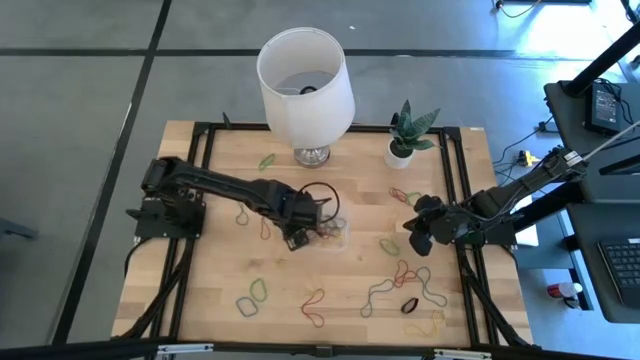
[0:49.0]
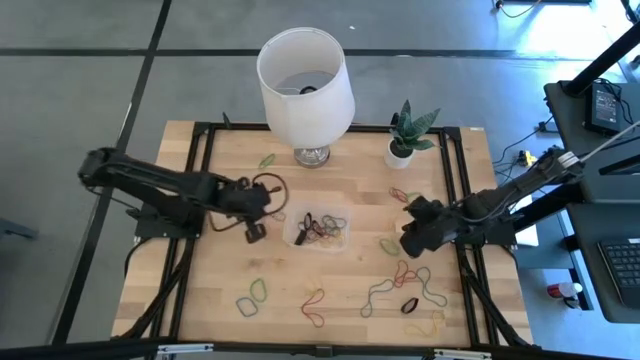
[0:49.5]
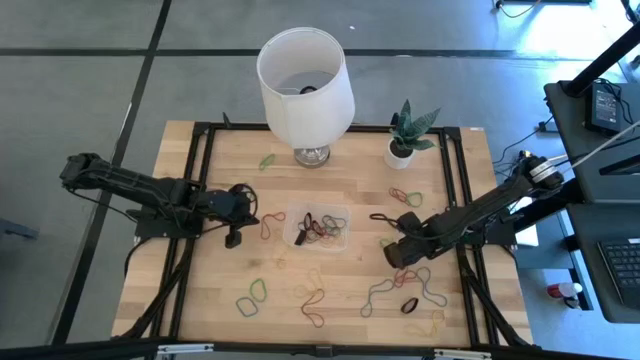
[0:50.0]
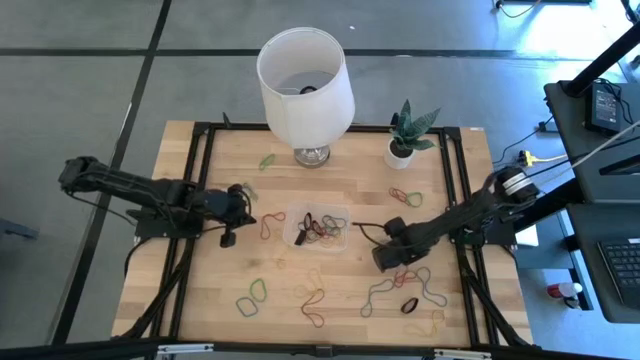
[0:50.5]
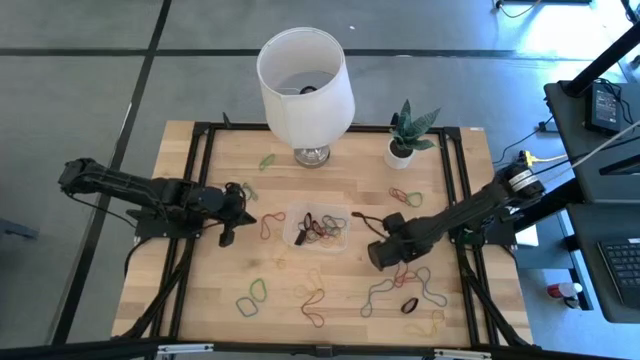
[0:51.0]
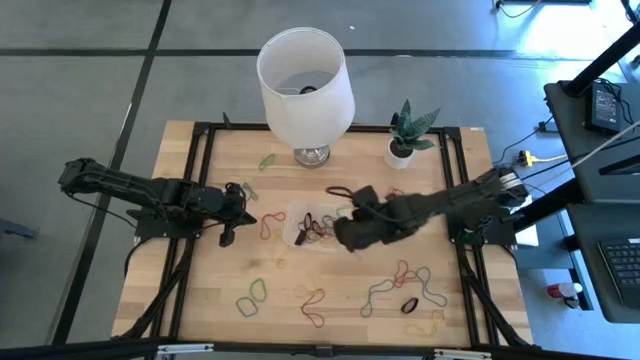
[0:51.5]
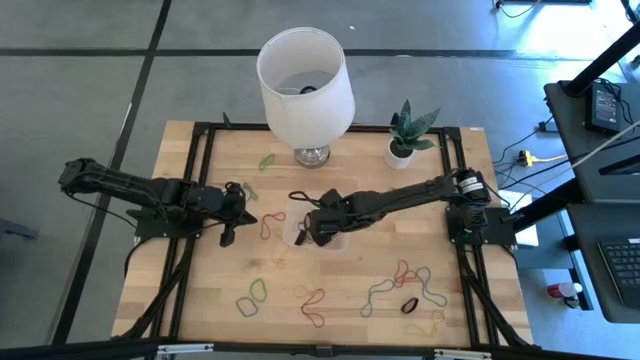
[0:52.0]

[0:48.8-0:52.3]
Task: Pick and place rubber bands into bin
Put the green rubber band into the transparent bin

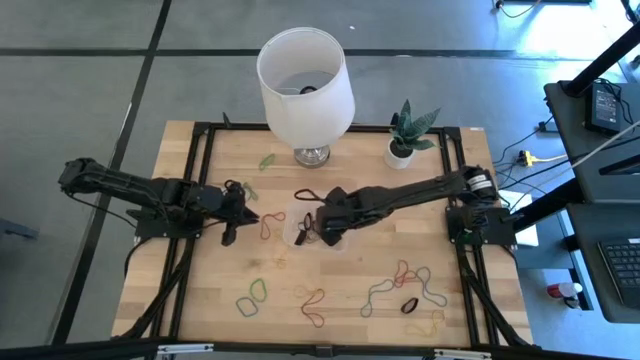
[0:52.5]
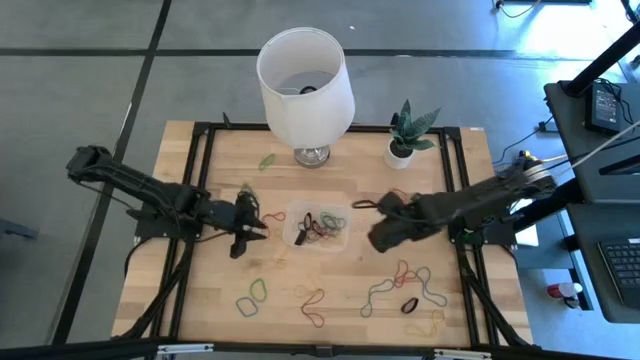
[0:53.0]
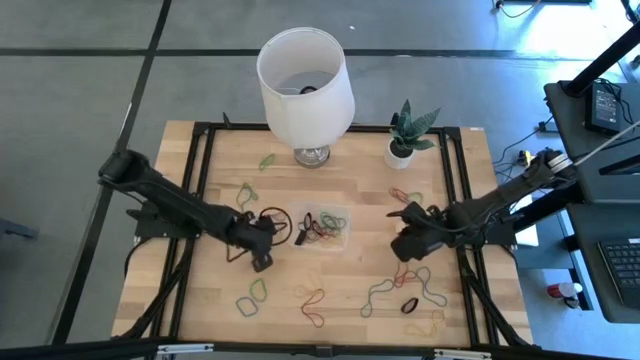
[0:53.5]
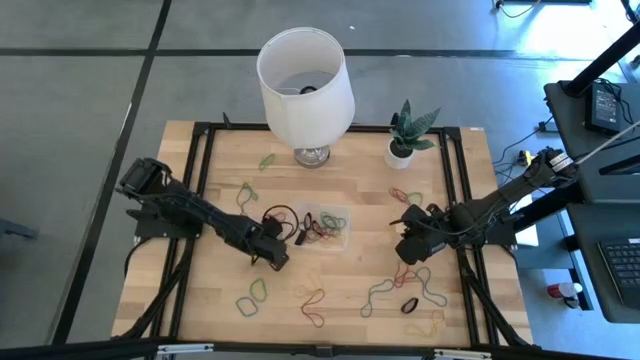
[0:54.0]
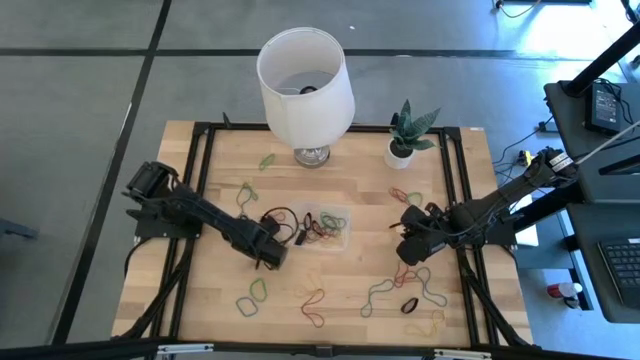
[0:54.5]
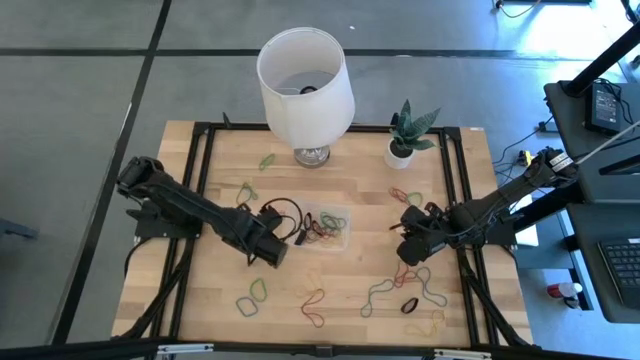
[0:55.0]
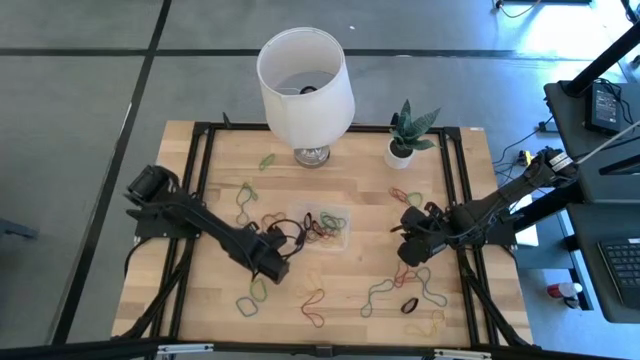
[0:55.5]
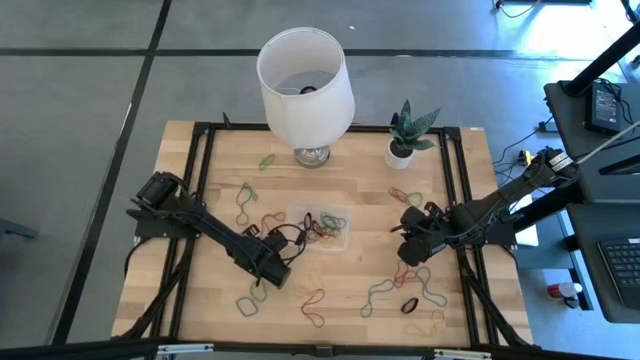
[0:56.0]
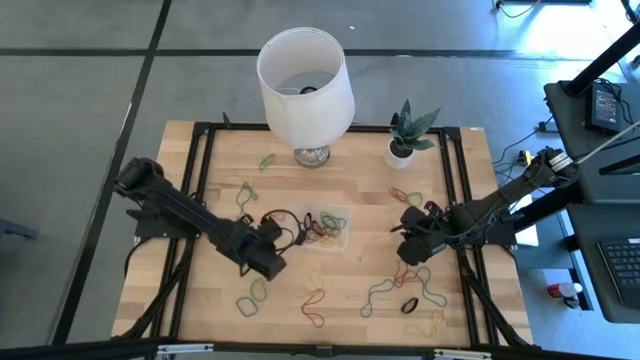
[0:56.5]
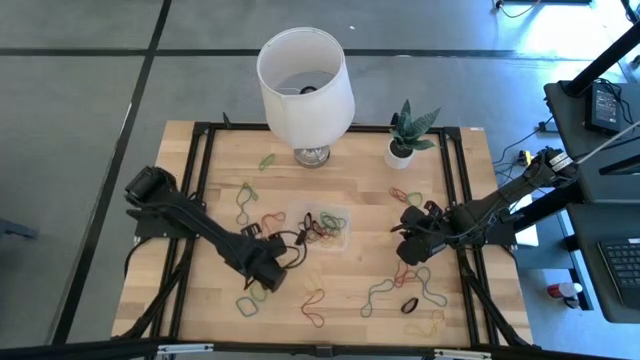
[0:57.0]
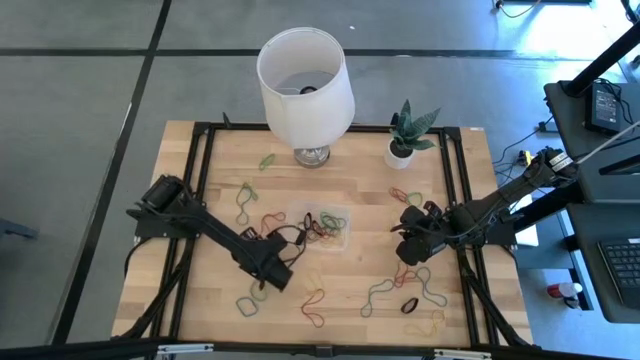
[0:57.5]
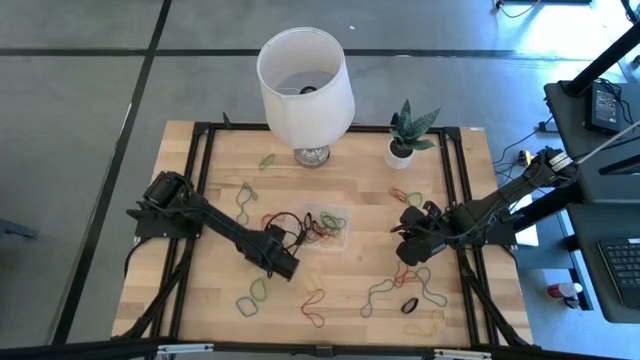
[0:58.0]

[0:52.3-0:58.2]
Put the yellow rubber band into the transparent bin

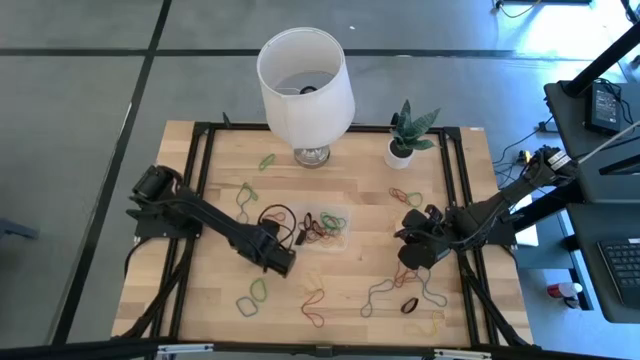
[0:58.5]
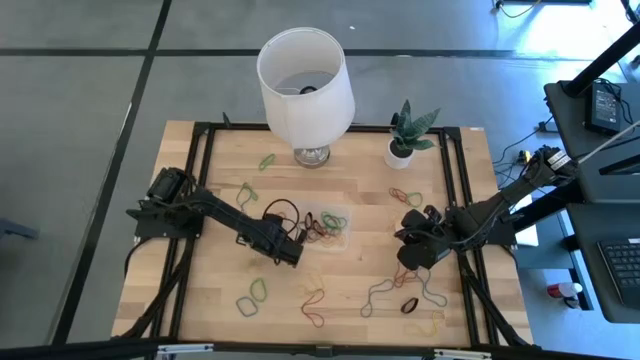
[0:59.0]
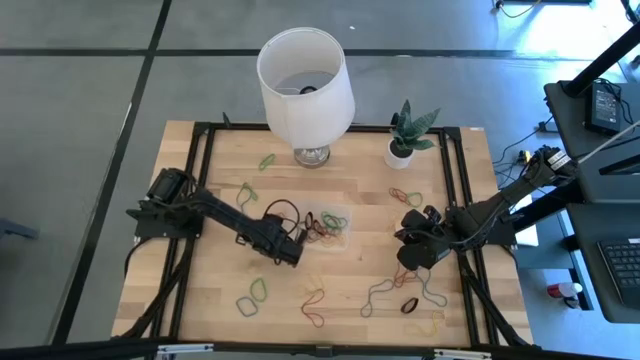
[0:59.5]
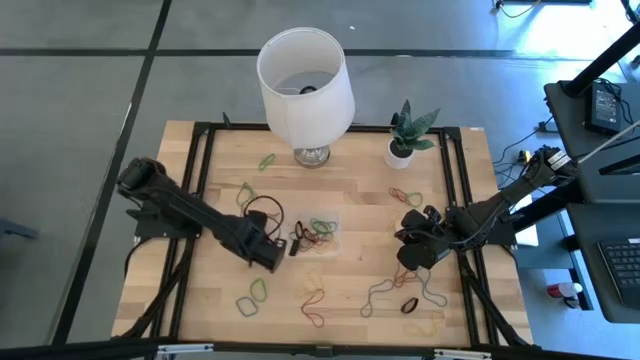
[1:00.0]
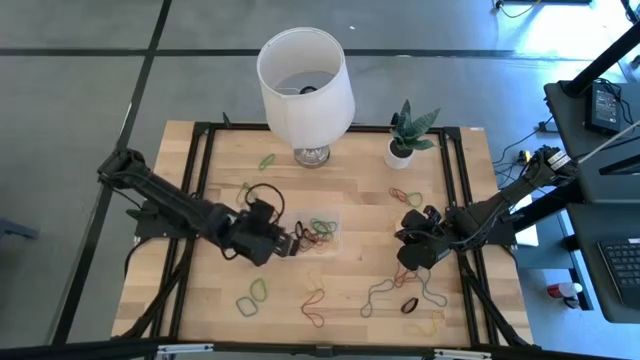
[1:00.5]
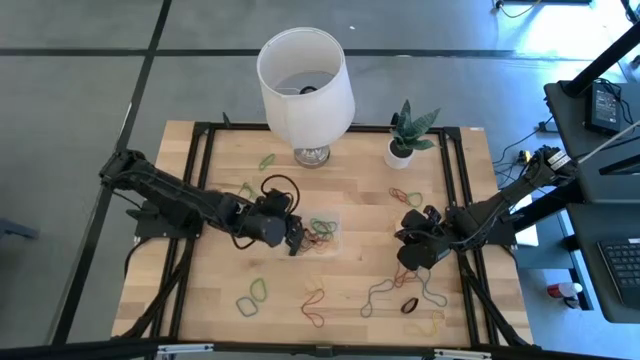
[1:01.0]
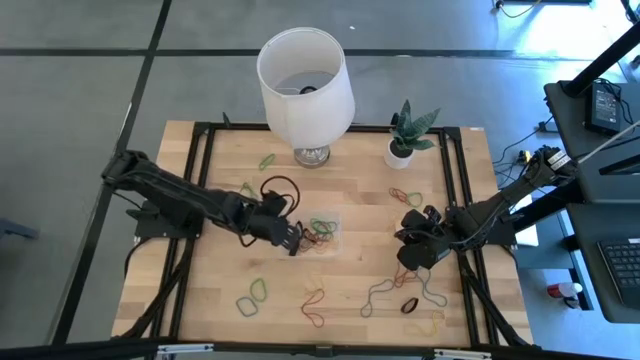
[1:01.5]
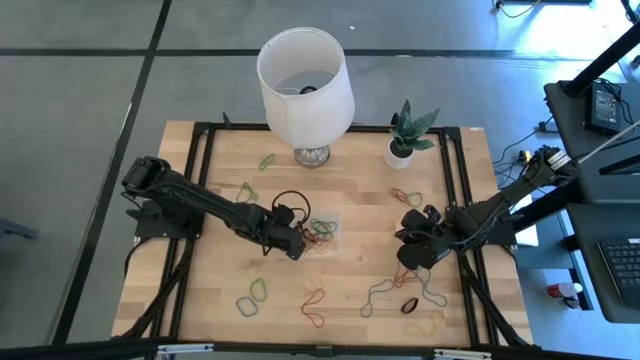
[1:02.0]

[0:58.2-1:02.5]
Put the yellow rubber band into the transparent bin

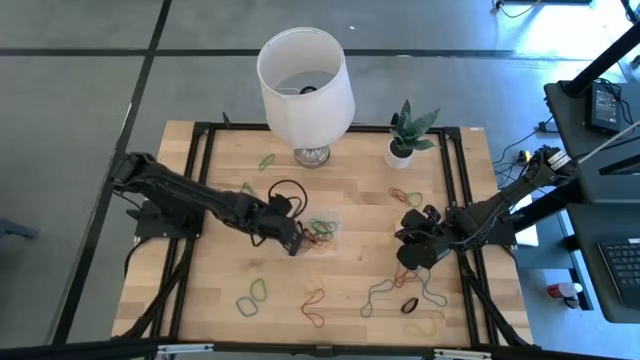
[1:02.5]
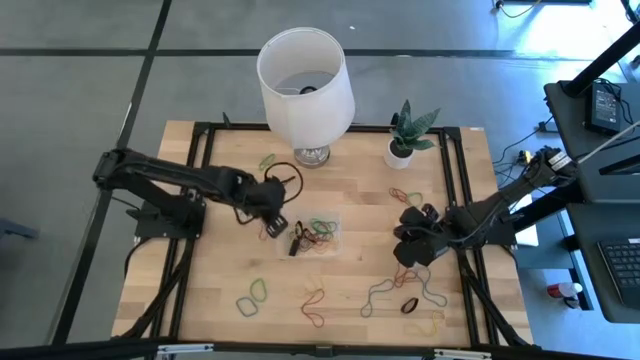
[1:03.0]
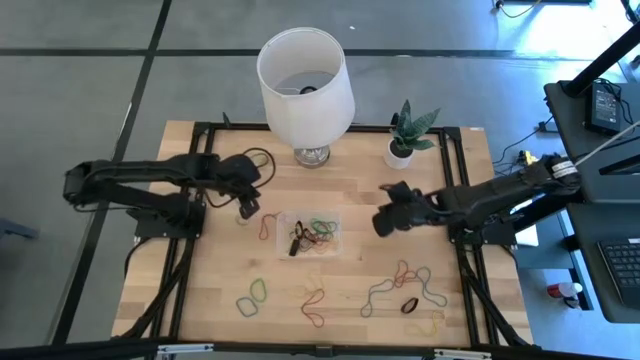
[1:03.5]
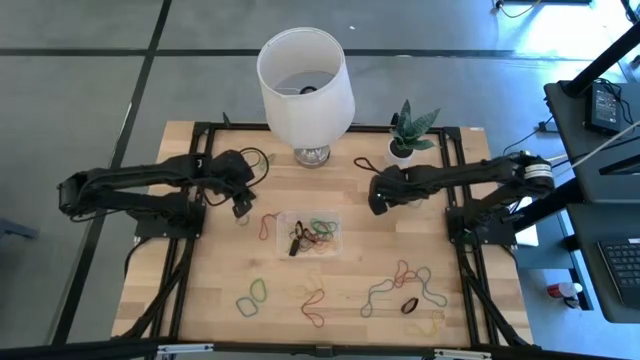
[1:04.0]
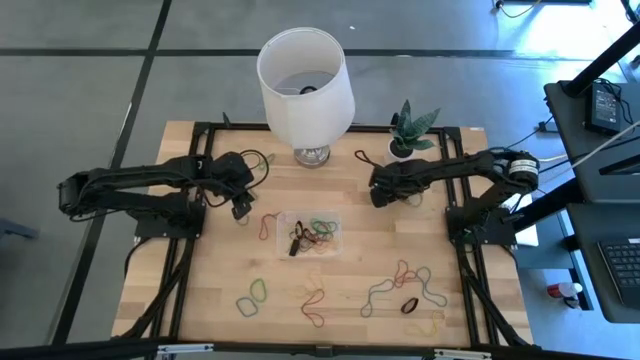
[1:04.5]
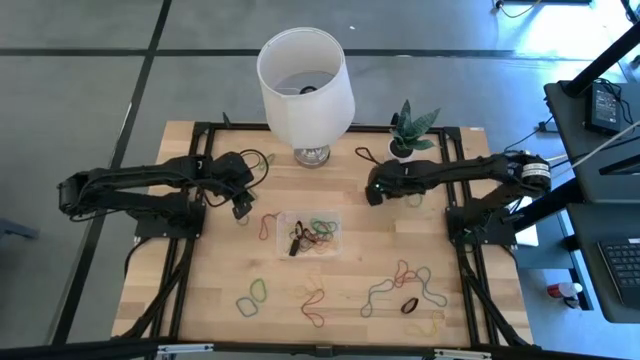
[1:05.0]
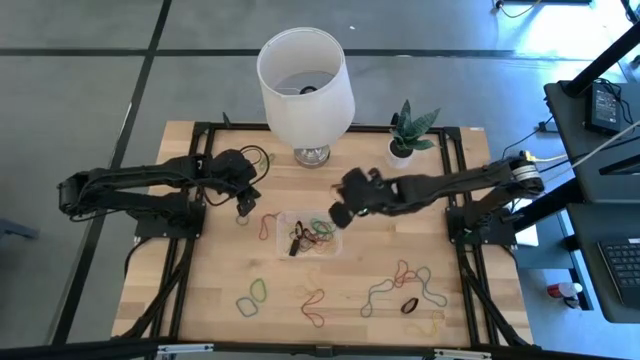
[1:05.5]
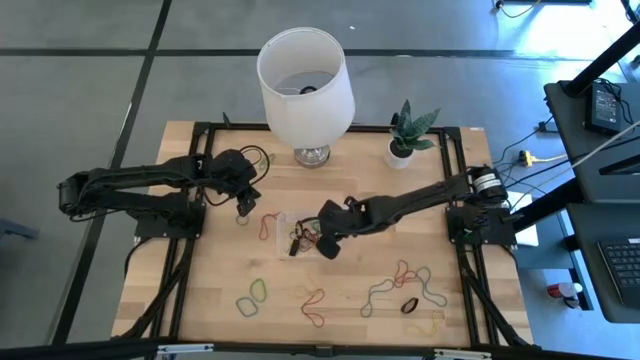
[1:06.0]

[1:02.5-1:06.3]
Put the red rubber band into the transparent bin

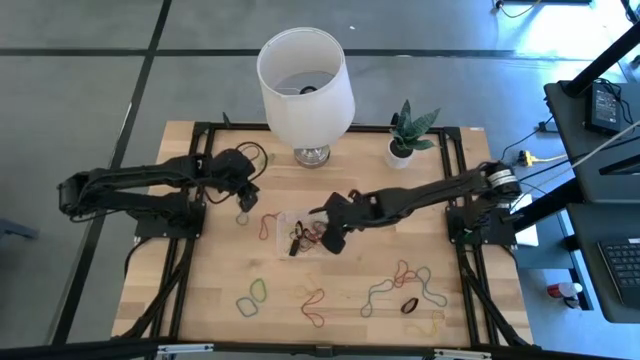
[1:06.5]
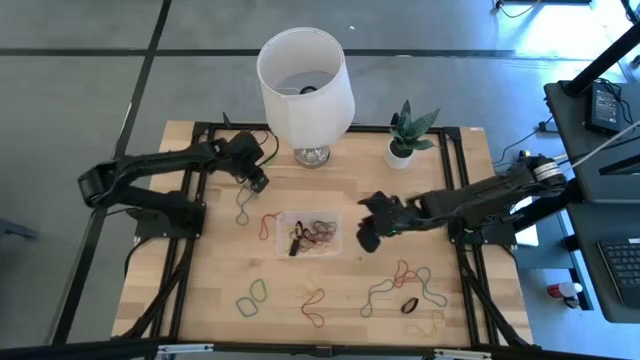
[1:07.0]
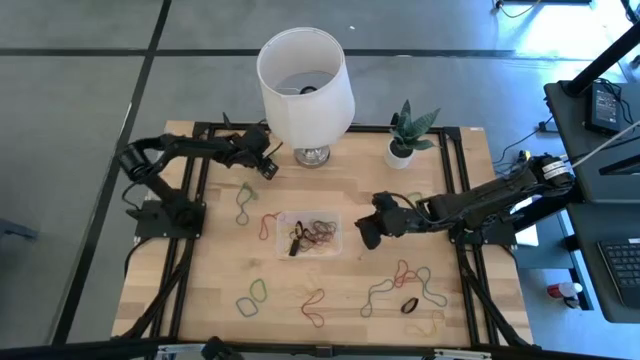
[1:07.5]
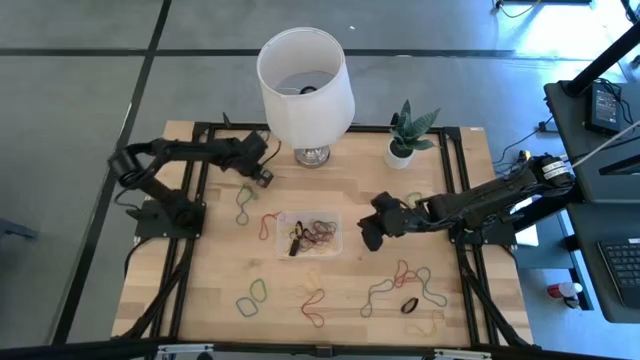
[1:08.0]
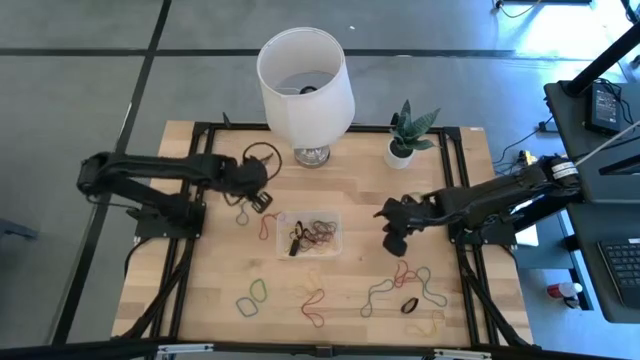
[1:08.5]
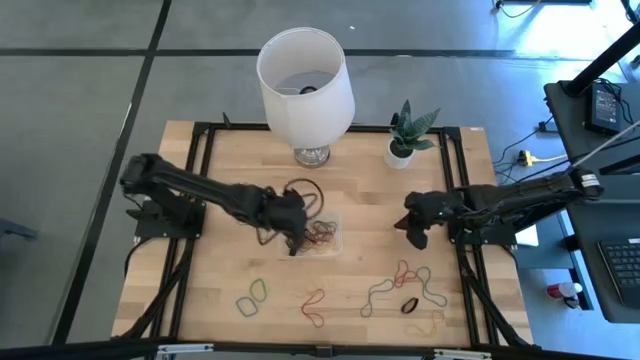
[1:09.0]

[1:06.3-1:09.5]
Put the green rubber band into the transparent bin
